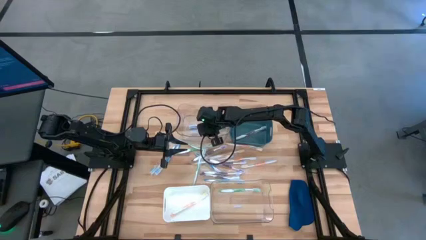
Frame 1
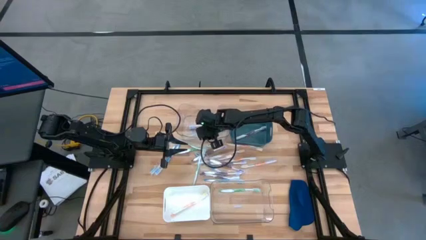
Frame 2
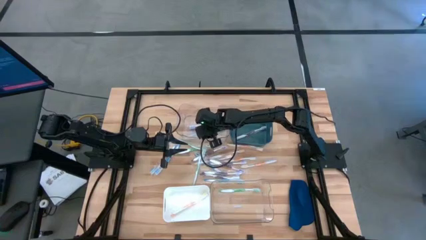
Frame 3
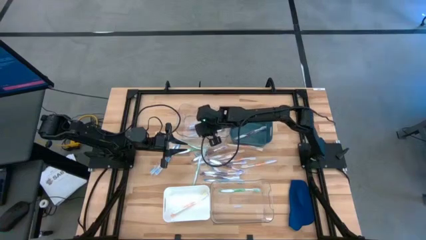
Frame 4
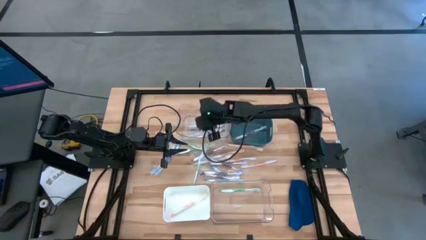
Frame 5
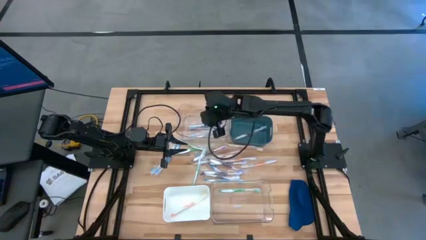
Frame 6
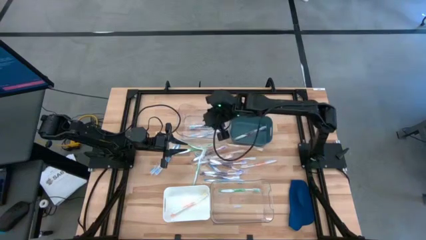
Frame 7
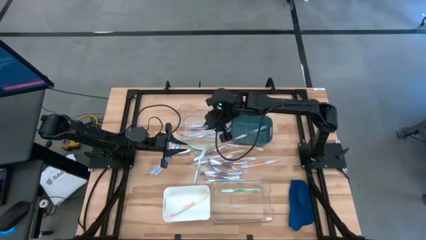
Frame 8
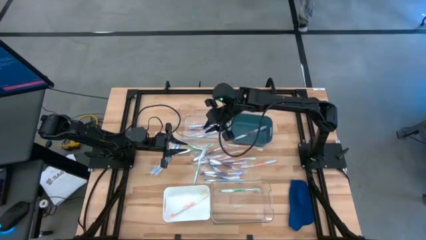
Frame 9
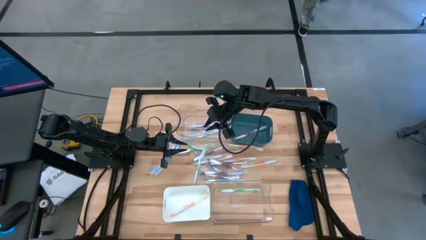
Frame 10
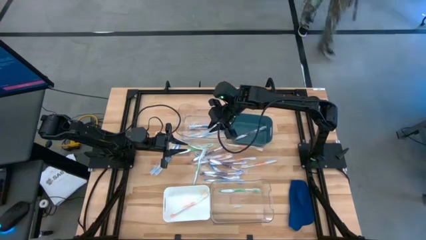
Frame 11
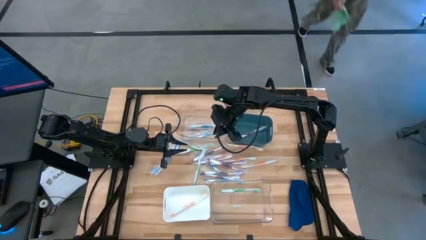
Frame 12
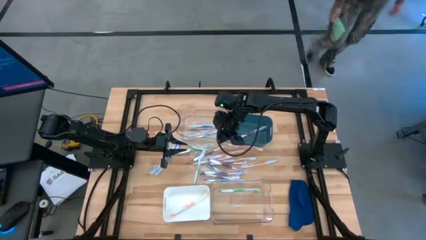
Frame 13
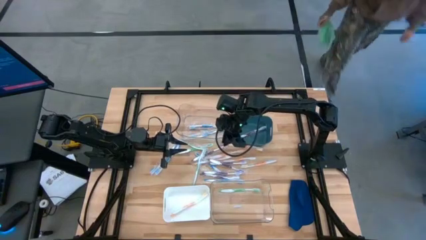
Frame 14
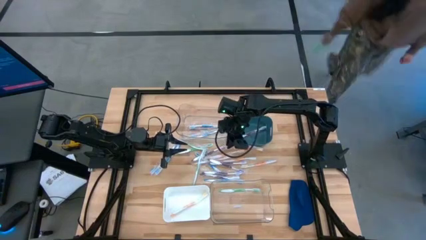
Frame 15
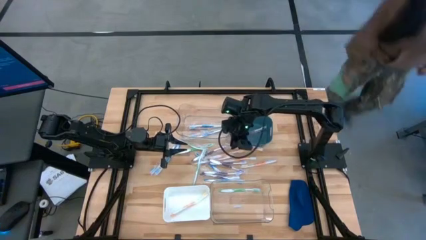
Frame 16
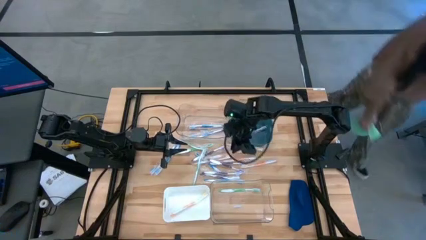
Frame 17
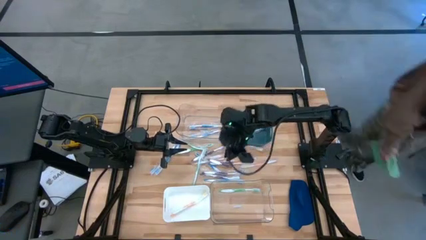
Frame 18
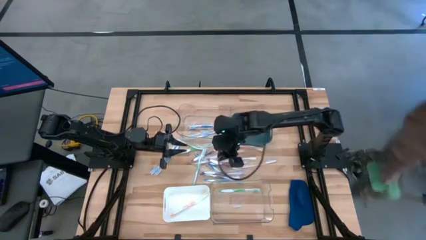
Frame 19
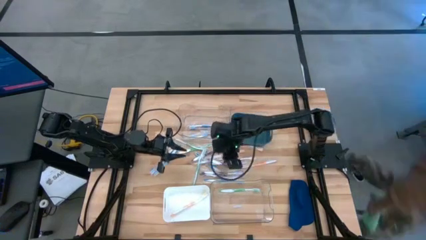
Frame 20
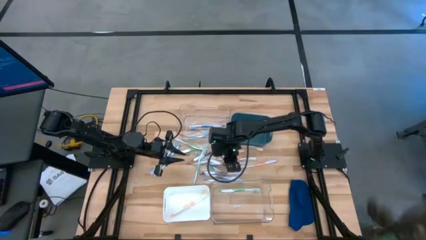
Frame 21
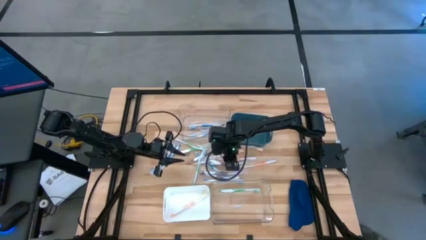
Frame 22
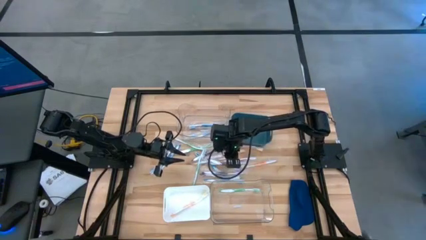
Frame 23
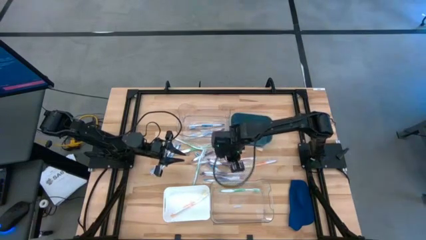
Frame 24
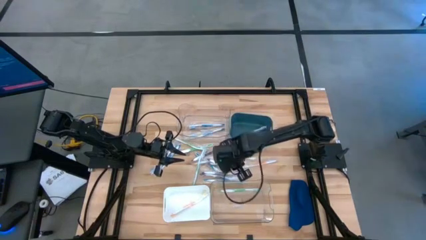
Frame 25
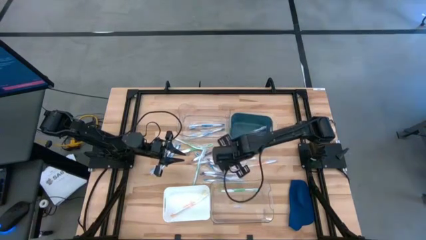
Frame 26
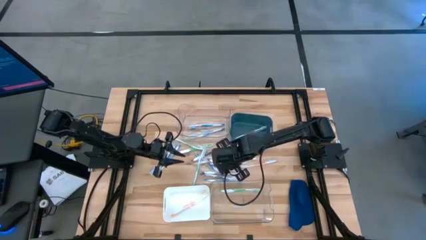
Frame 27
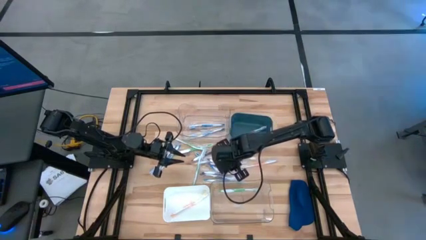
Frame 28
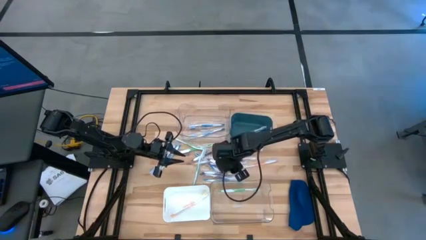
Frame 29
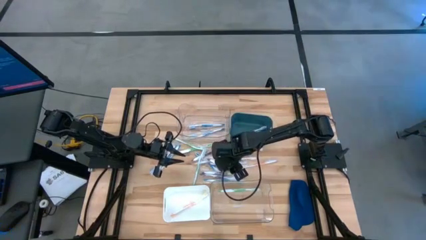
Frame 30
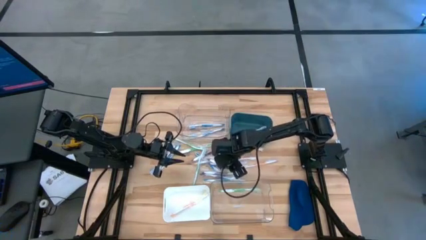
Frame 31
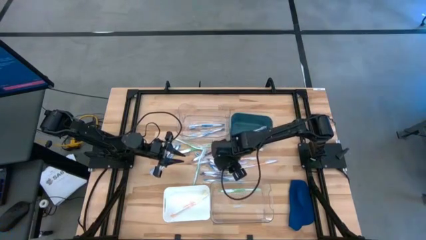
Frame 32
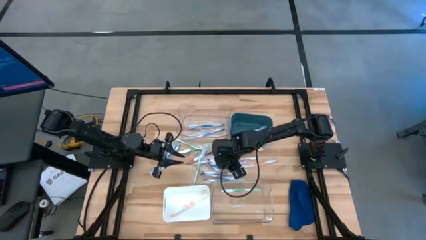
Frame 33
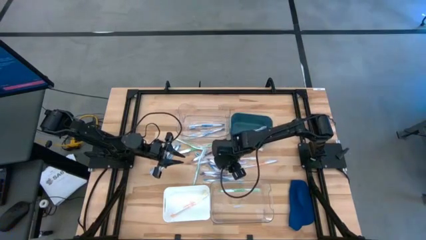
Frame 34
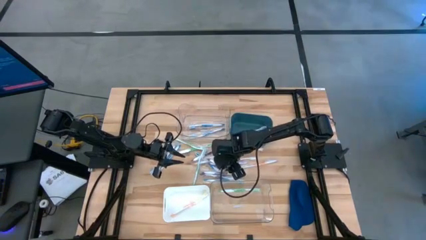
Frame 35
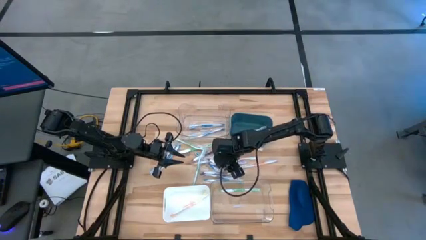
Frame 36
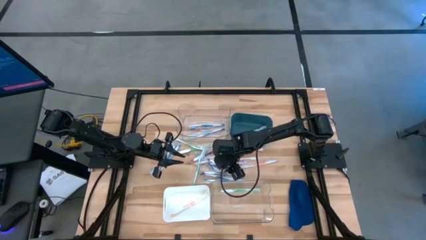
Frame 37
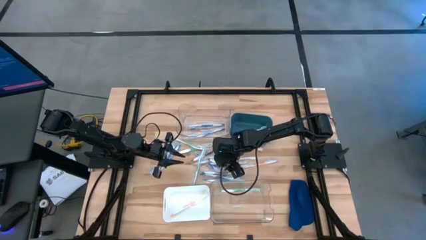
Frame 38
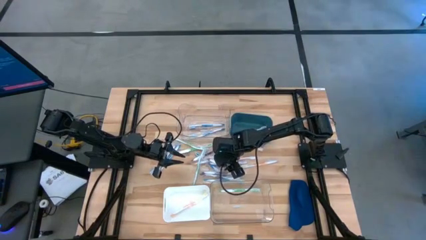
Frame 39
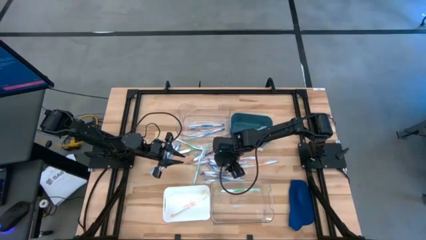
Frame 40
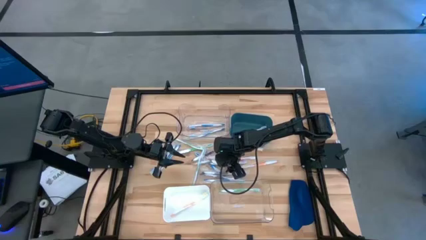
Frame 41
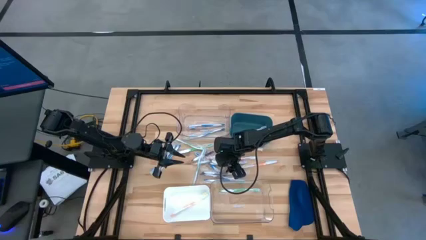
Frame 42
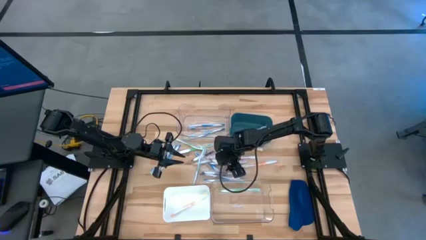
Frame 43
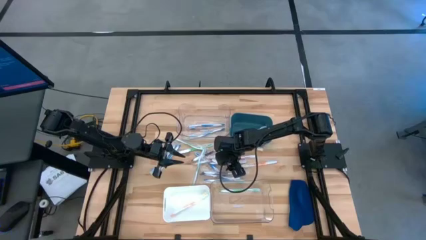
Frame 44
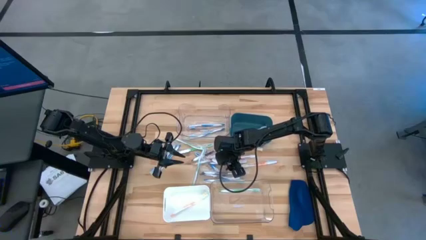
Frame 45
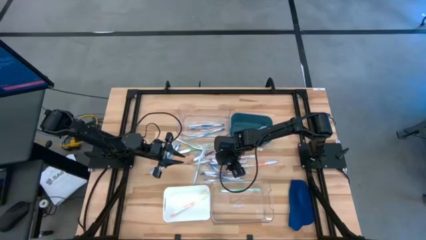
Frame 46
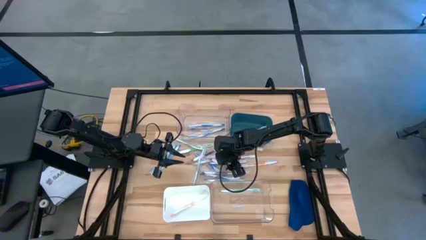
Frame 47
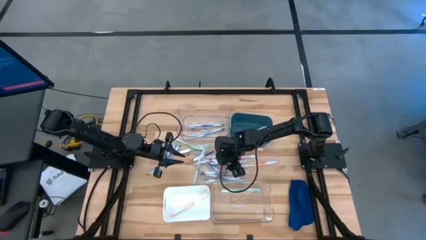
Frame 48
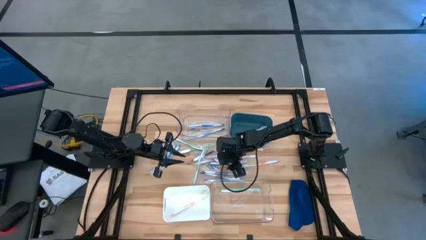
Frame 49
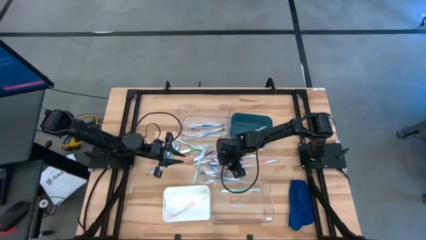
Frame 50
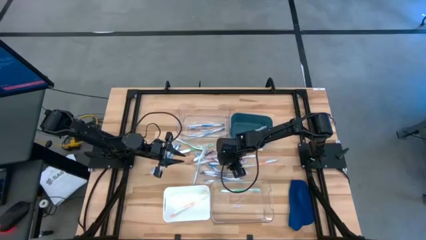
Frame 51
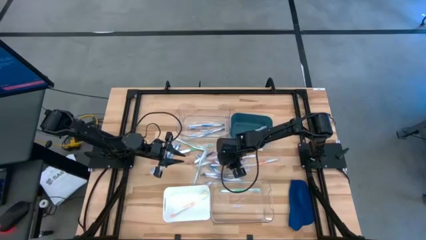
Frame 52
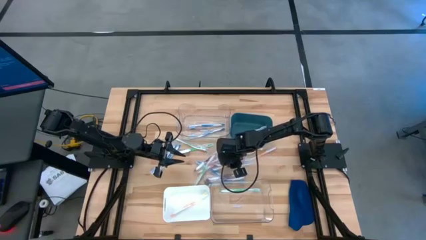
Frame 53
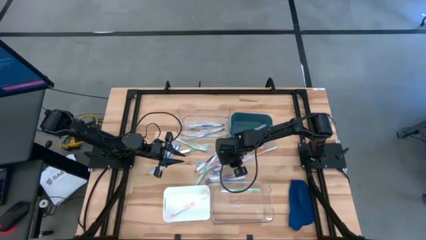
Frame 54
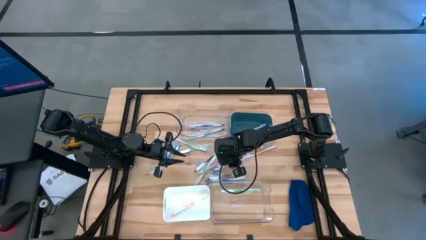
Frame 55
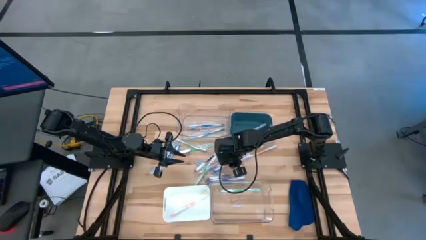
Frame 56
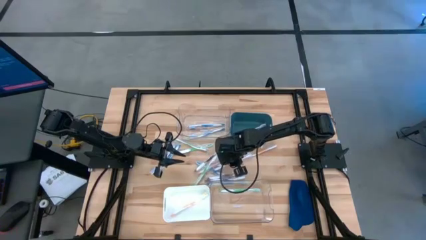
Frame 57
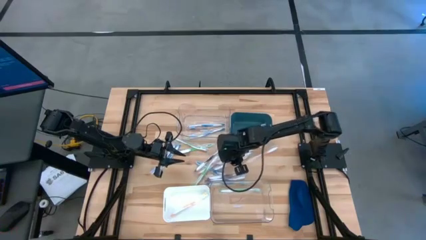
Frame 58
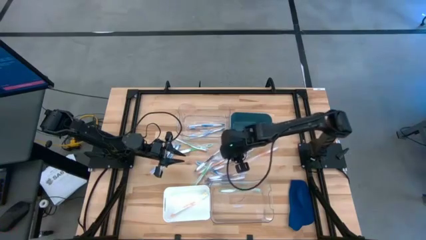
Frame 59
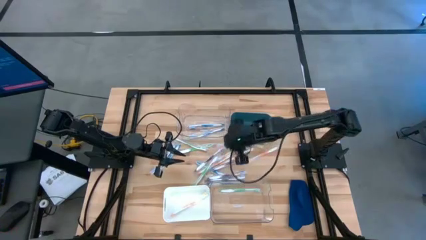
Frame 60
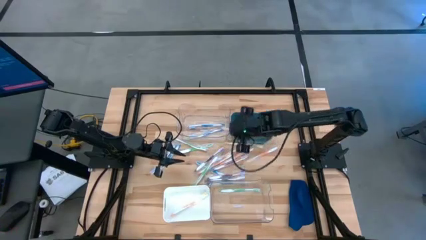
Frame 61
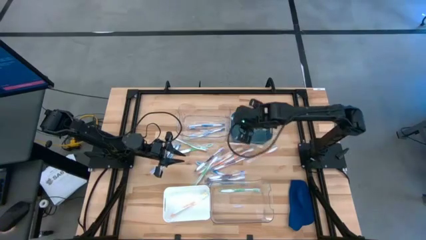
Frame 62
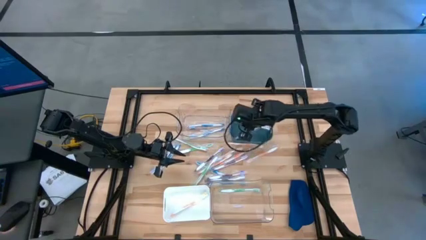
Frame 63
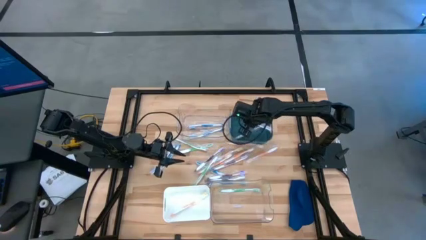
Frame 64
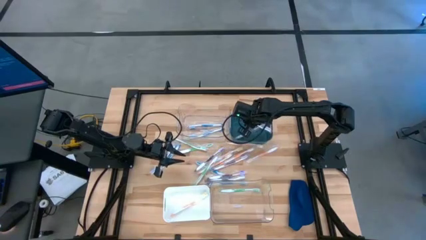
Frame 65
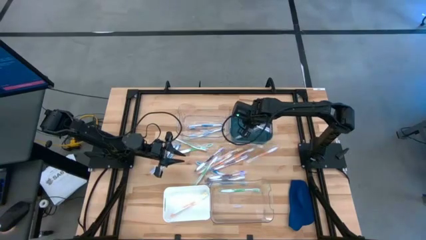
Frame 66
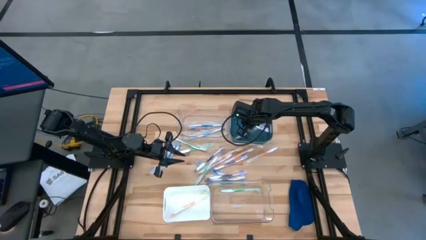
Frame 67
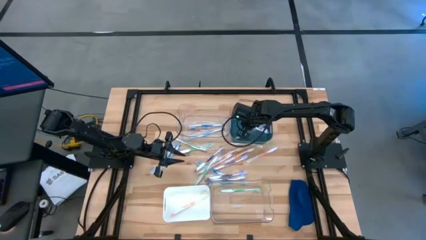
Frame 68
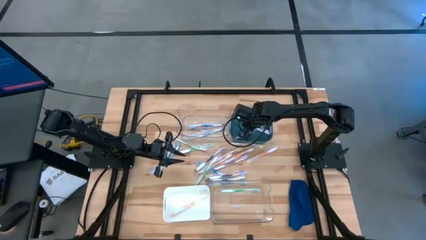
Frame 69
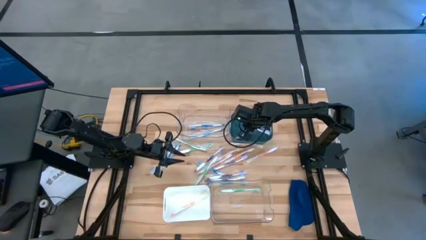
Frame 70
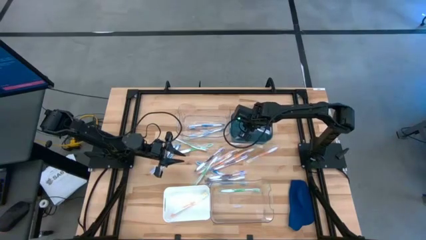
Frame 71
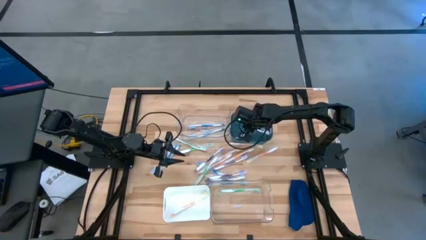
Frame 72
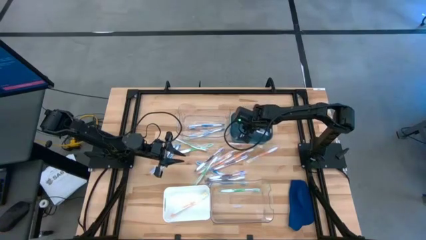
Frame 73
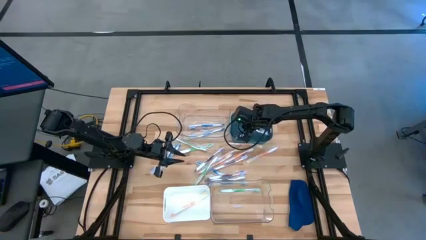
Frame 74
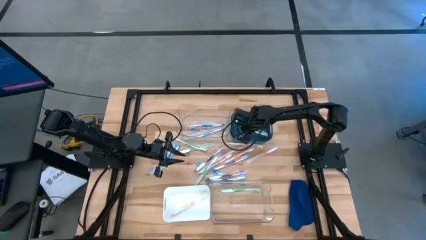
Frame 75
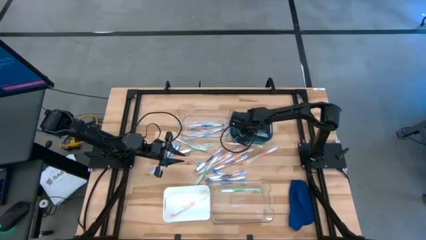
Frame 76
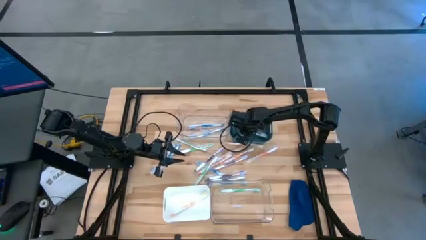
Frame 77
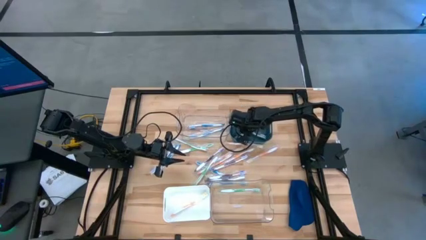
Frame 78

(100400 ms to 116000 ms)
Task: Pick & Place Toothbrushes
Put the purple toothbrush into the green bin
